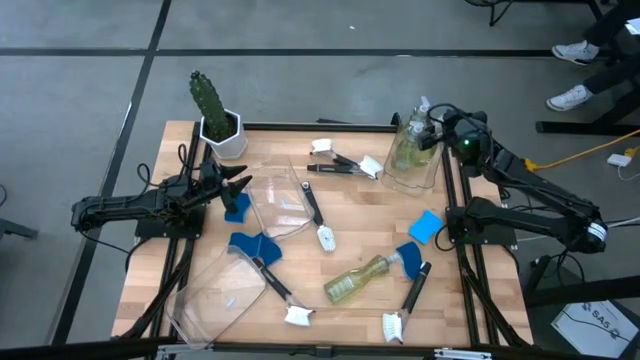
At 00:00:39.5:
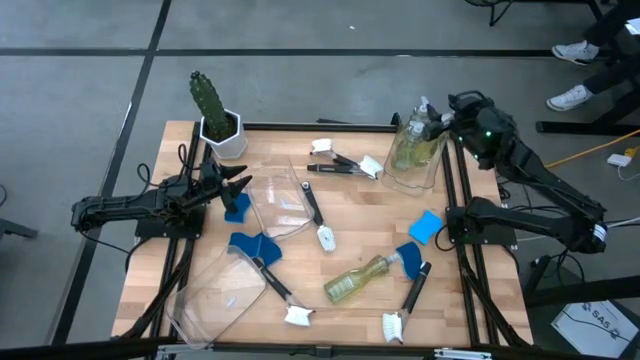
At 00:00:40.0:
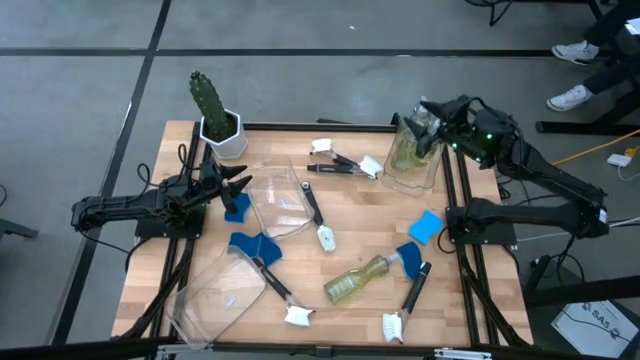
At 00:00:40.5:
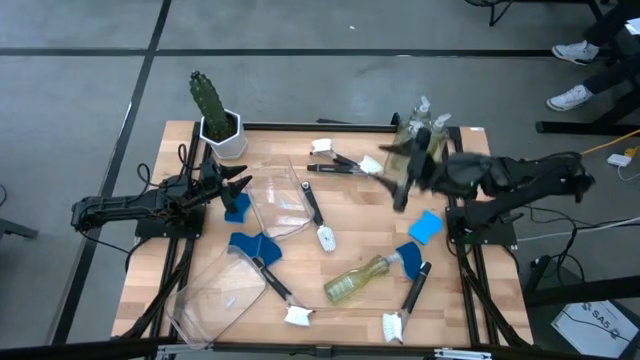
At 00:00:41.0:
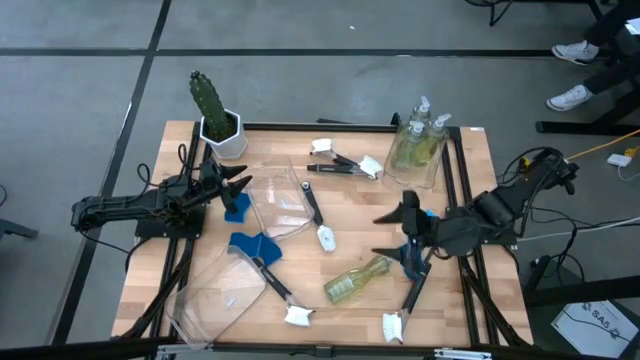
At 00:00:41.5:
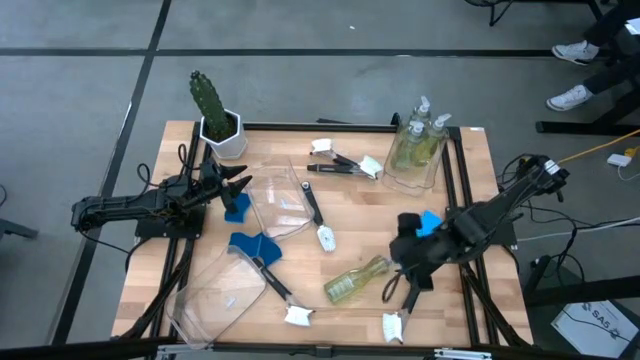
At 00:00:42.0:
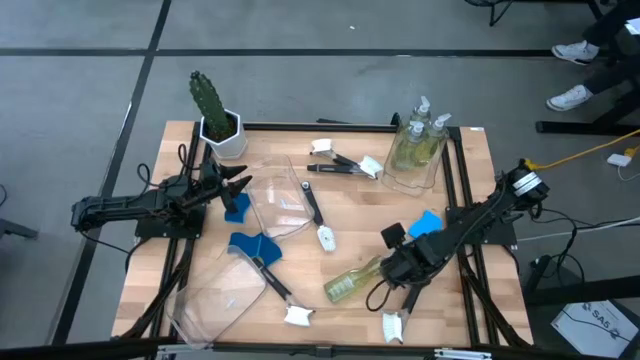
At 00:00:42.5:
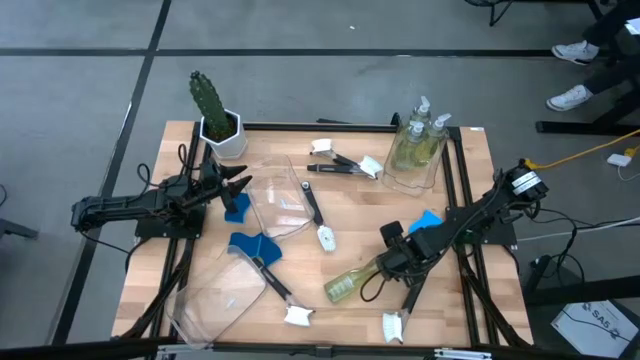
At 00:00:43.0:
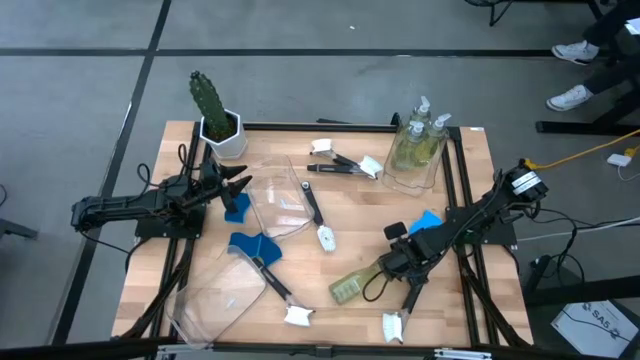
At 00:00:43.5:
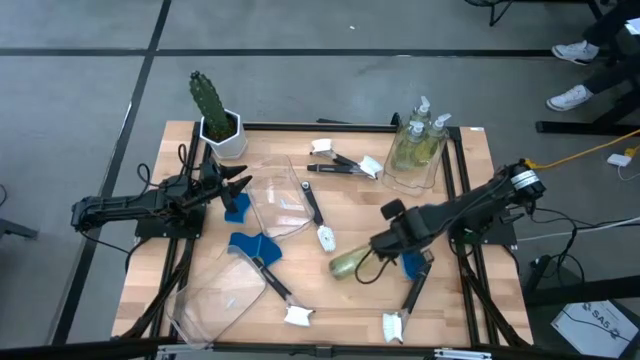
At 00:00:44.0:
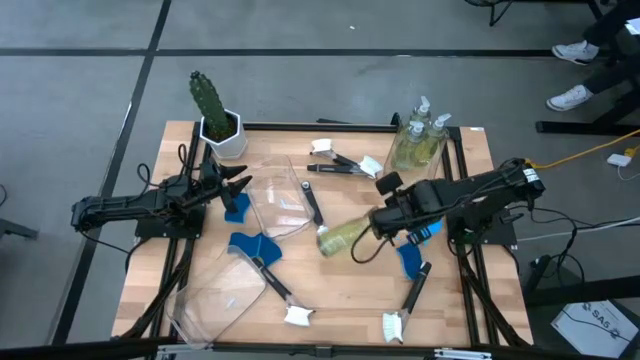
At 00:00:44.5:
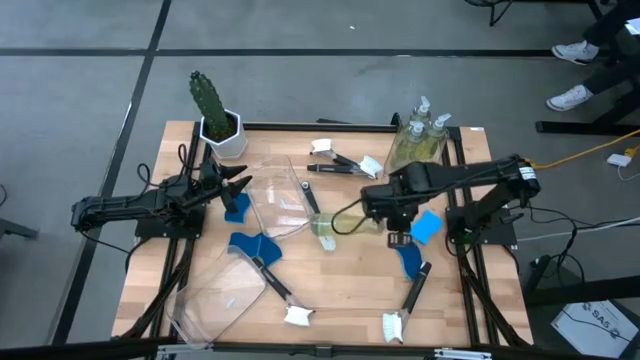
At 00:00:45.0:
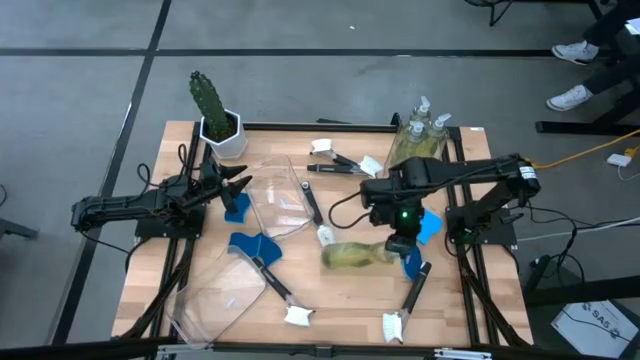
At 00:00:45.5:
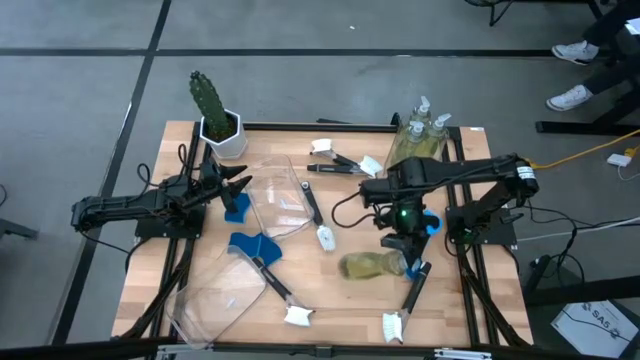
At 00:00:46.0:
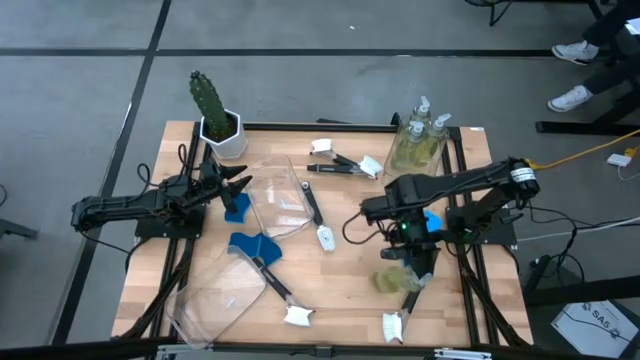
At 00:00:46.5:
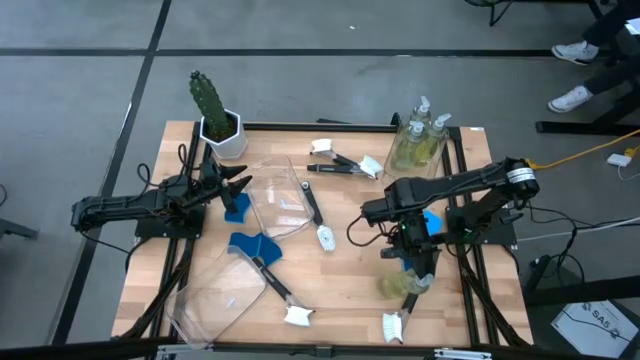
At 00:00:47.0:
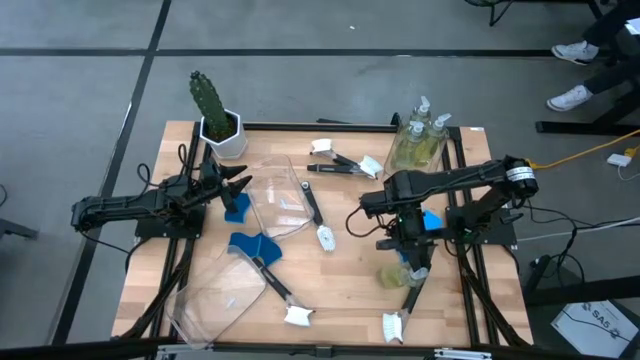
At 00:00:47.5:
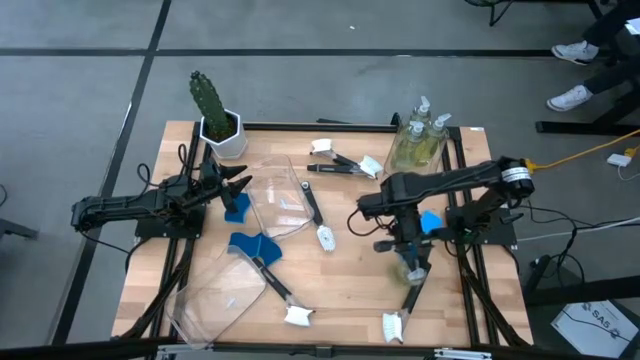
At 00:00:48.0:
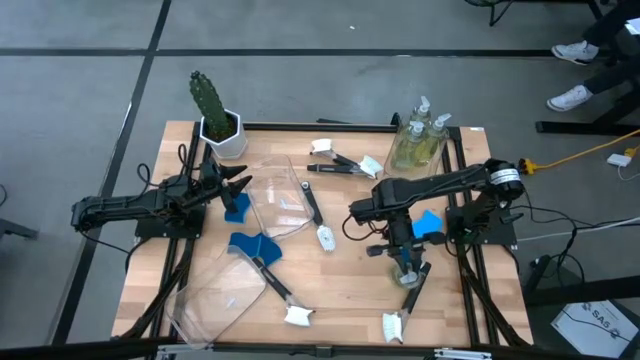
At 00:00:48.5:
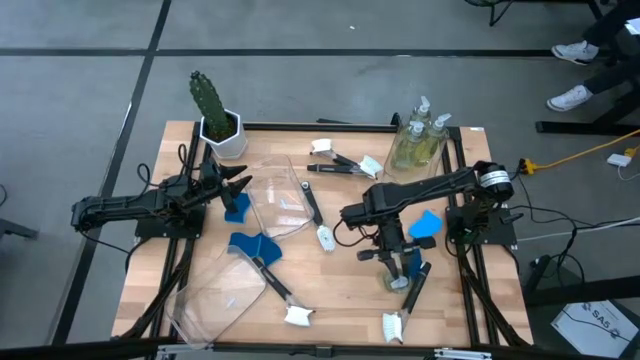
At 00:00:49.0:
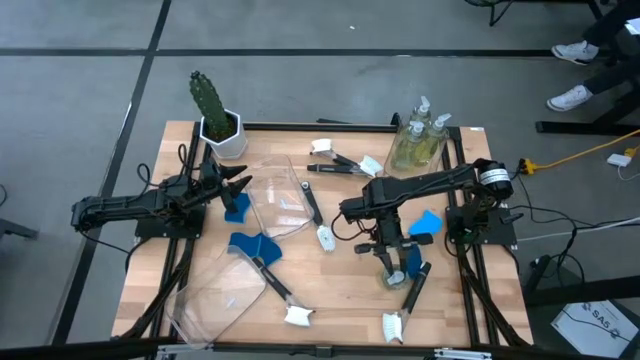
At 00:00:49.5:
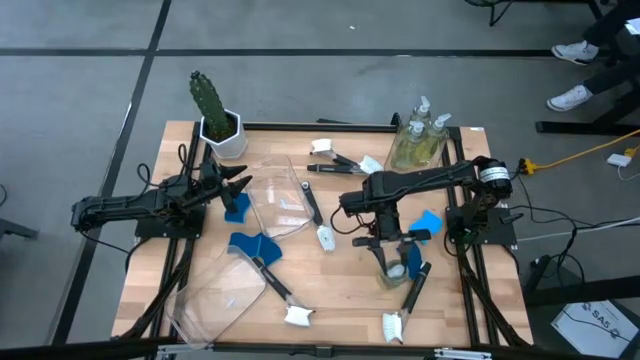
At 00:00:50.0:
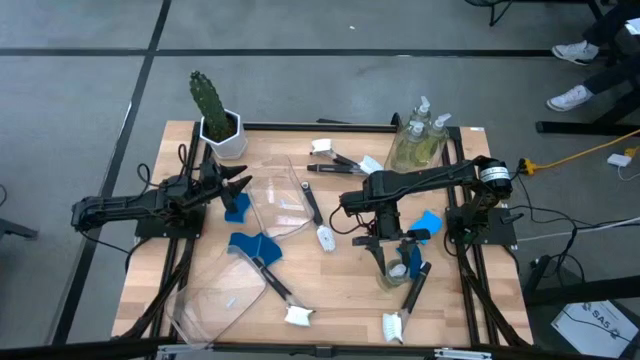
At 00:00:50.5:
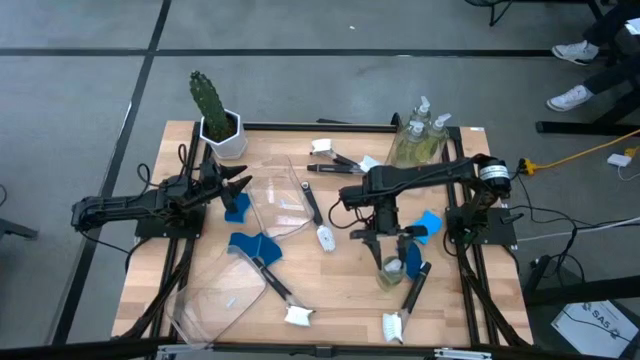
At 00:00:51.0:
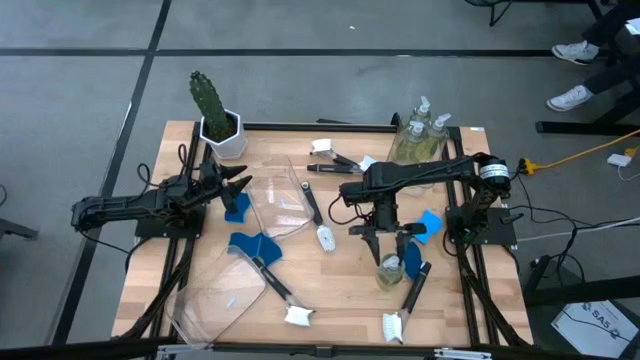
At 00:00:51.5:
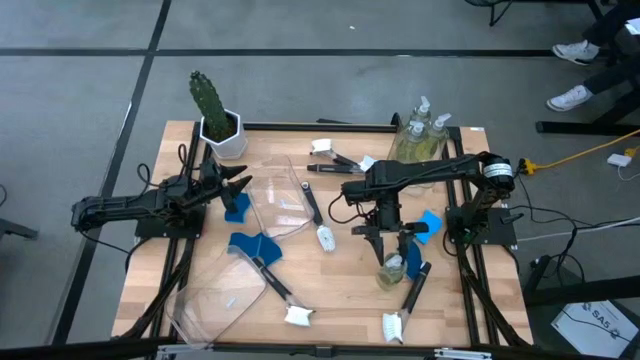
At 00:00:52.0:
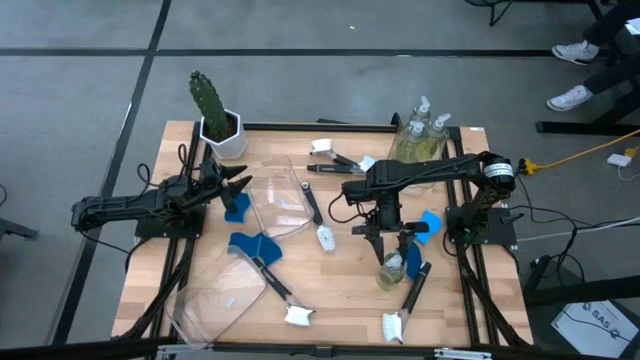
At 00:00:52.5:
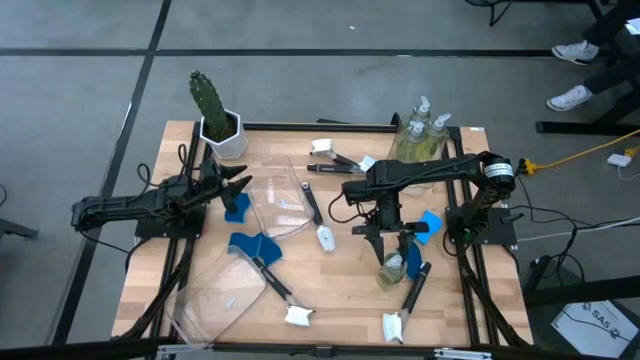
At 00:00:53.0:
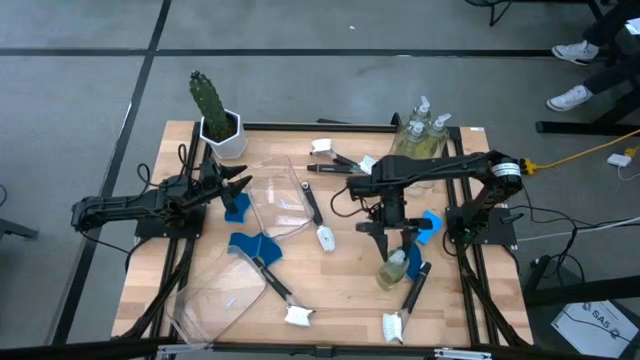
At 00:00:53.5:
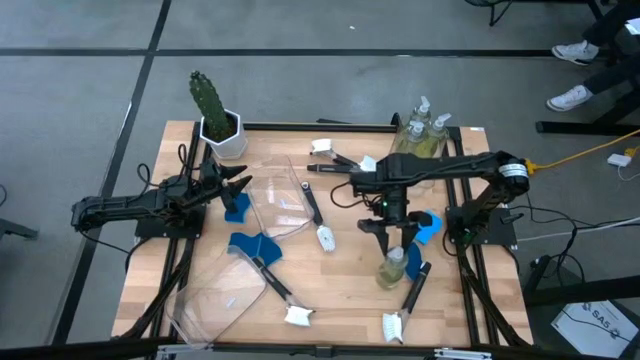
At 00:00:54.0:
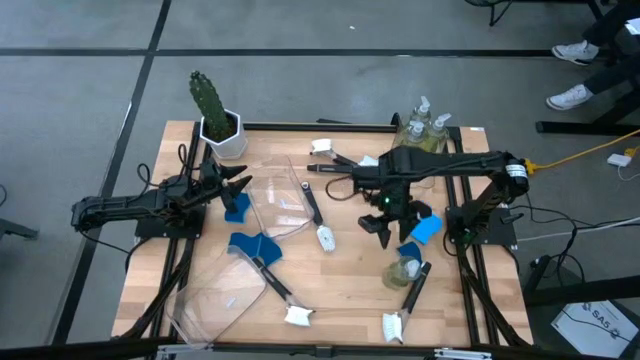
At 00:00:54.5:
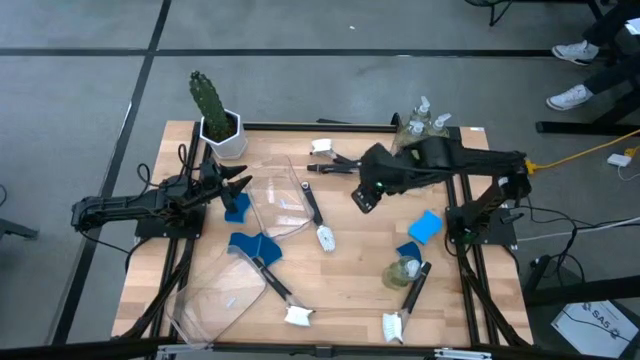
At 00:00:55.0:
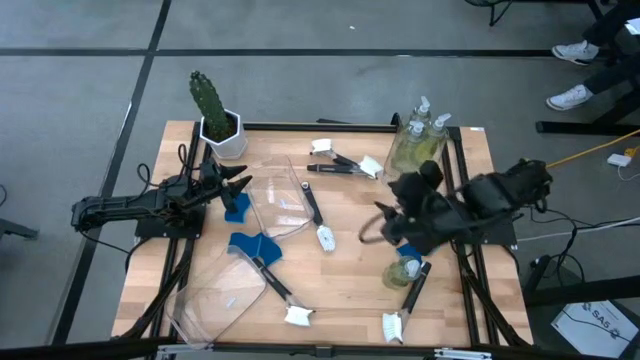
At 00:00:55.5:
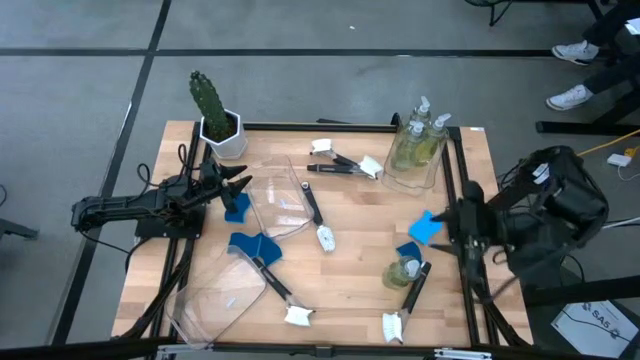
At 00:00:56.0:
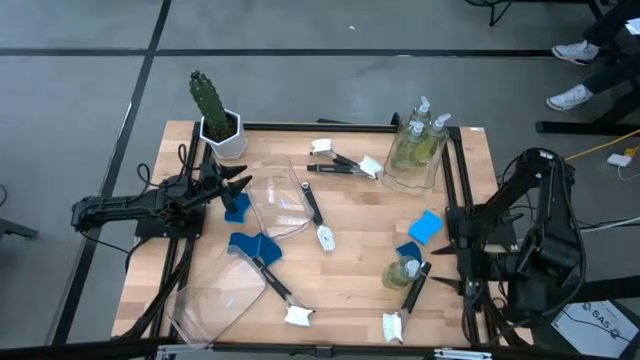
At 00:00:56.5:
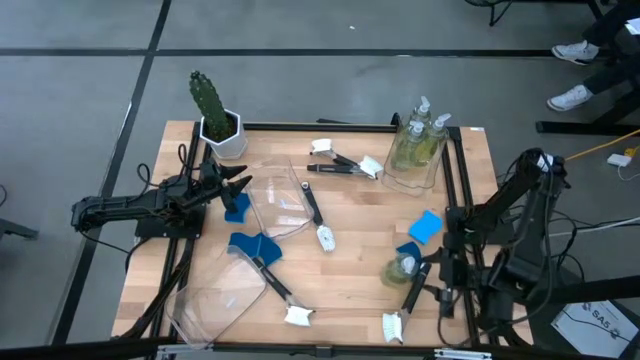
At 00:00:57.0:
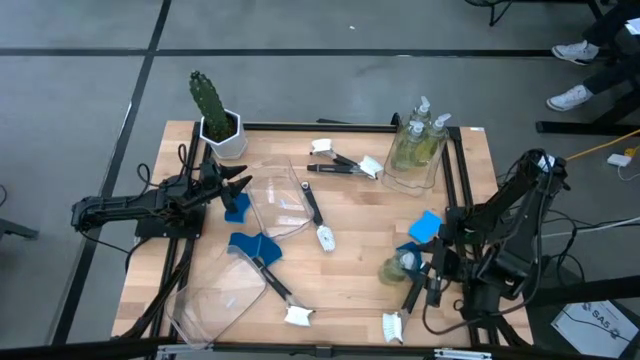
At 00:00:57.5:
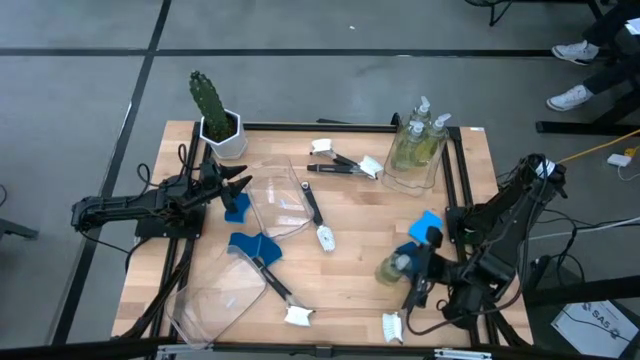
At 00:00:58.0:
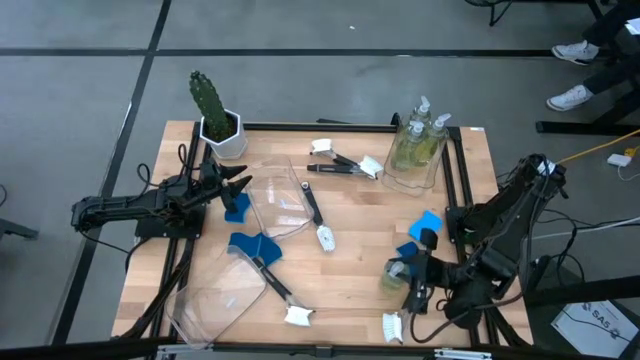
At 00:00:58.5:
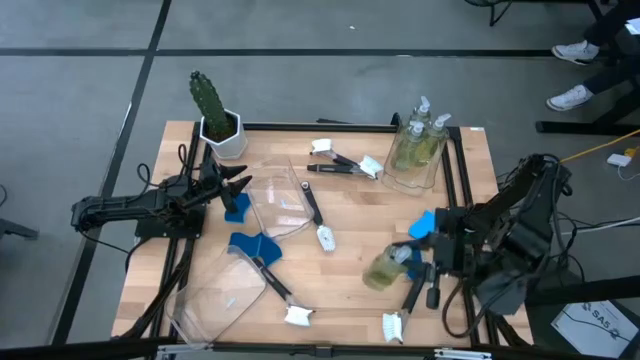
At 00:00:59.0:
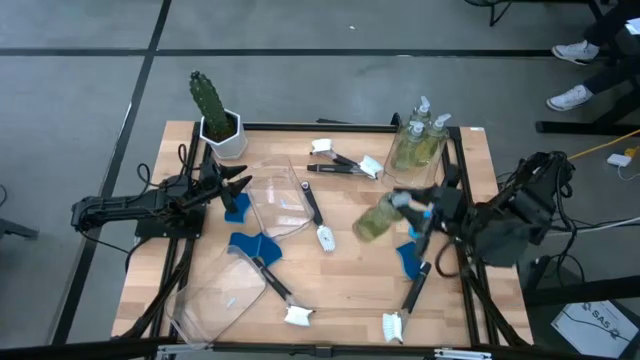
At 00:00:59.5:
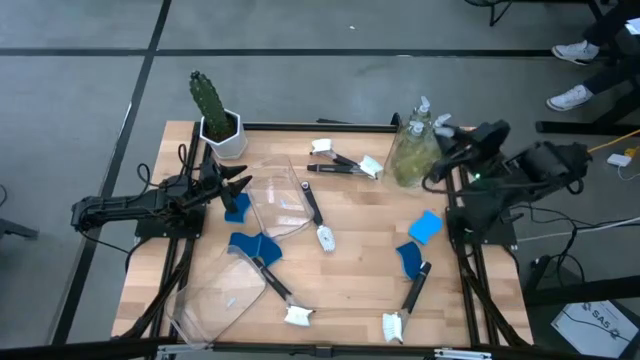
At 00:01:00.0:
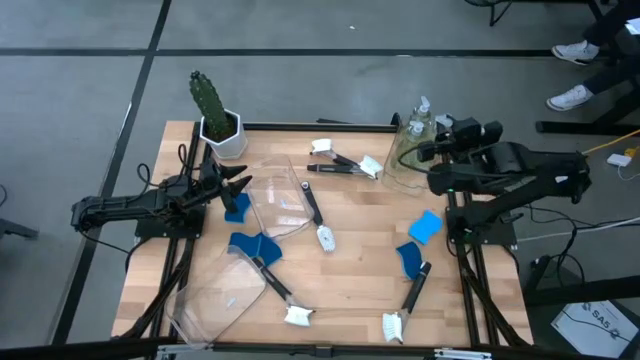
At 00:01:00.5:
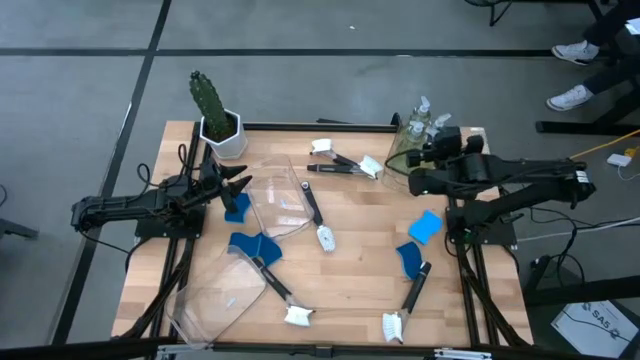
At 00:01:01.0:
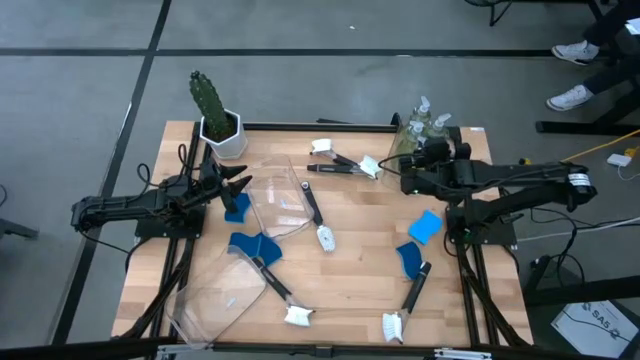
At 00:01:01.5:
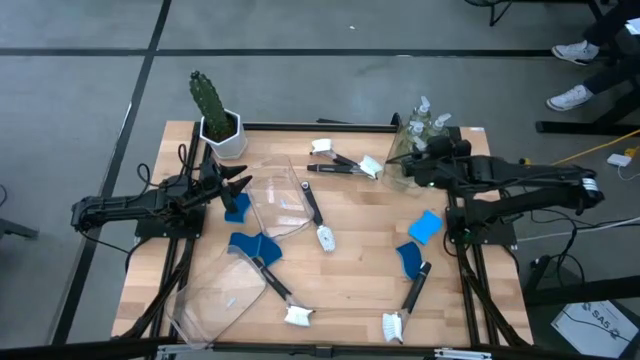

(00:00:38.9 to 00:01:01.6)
Task: Pick & Place Kitchen Sink Supplies
Put the green dish soap into the top right transparent bin
